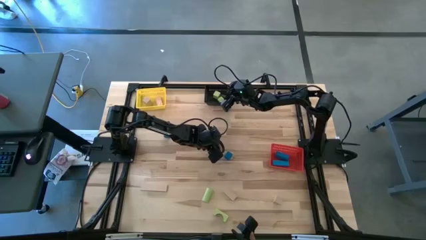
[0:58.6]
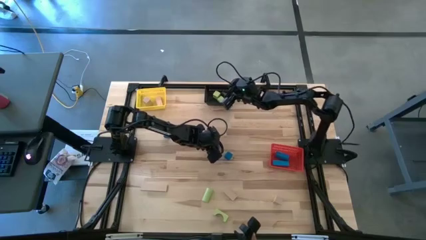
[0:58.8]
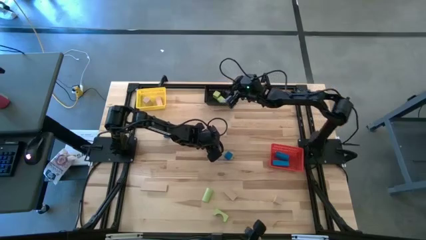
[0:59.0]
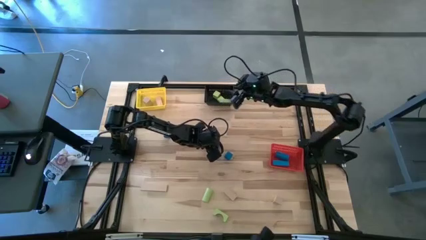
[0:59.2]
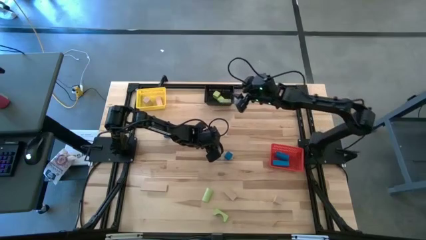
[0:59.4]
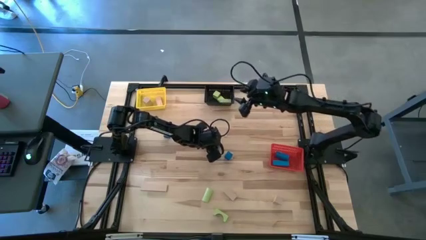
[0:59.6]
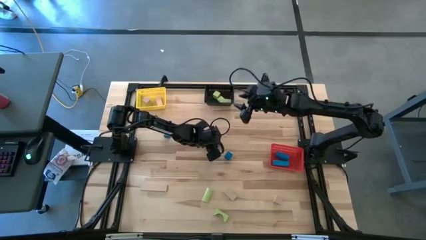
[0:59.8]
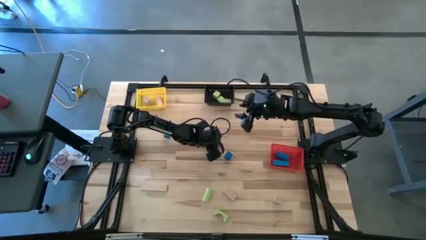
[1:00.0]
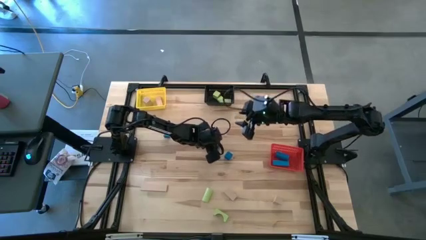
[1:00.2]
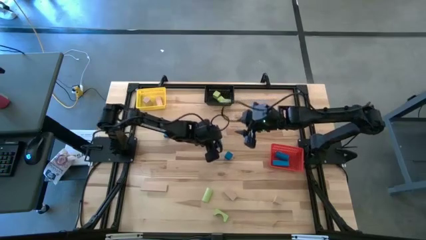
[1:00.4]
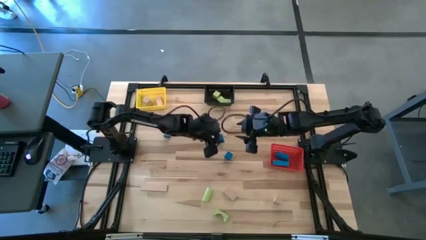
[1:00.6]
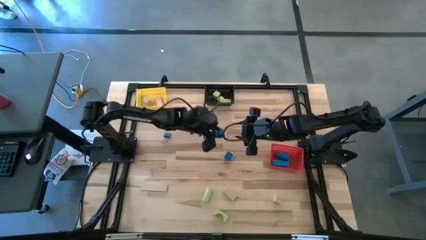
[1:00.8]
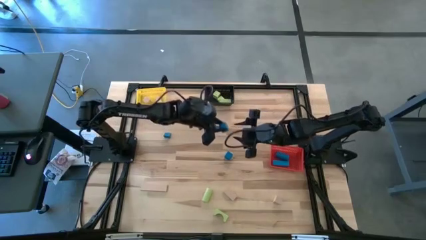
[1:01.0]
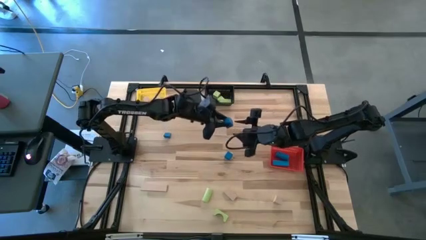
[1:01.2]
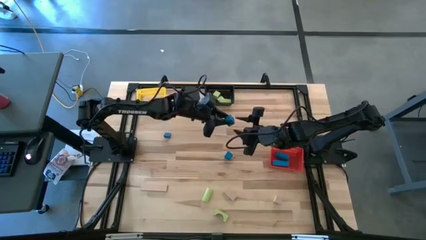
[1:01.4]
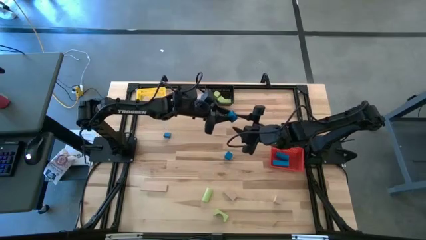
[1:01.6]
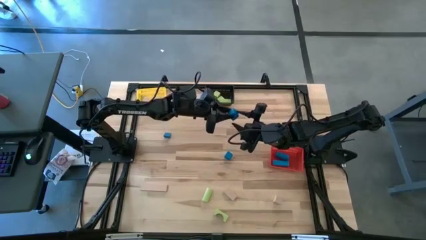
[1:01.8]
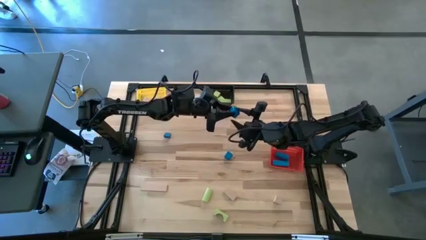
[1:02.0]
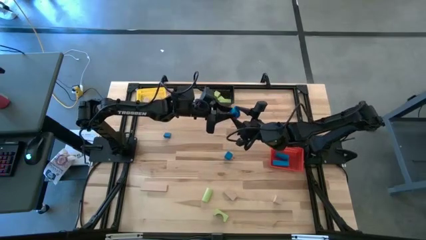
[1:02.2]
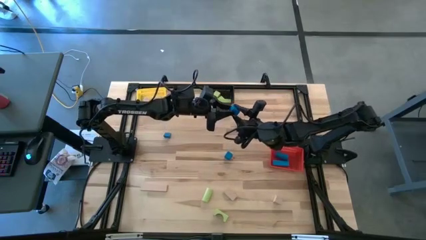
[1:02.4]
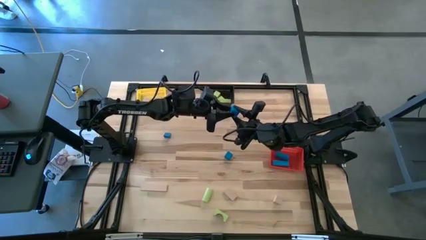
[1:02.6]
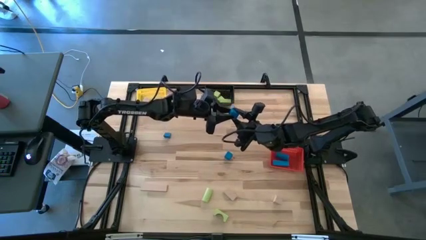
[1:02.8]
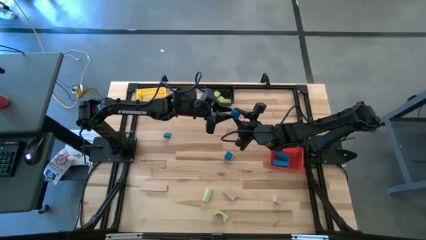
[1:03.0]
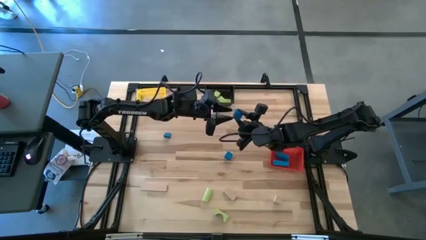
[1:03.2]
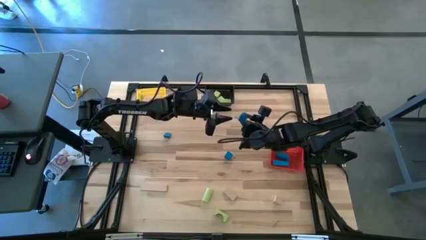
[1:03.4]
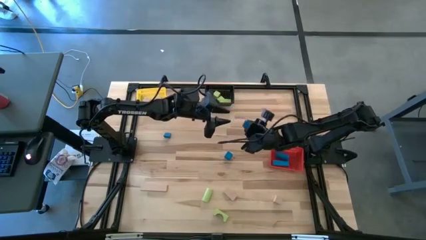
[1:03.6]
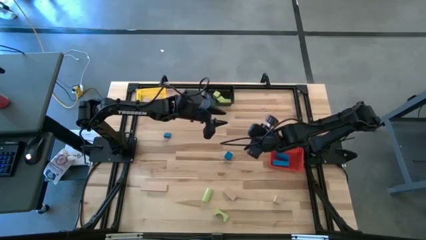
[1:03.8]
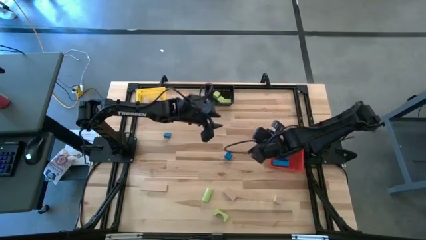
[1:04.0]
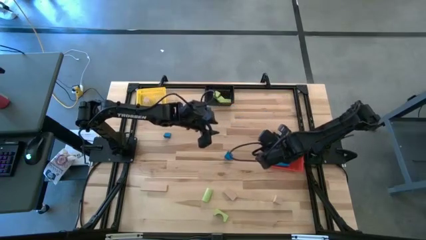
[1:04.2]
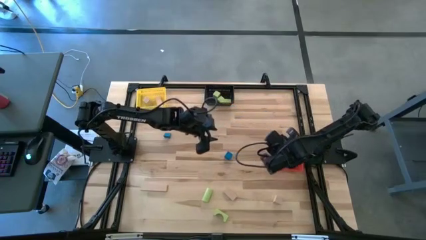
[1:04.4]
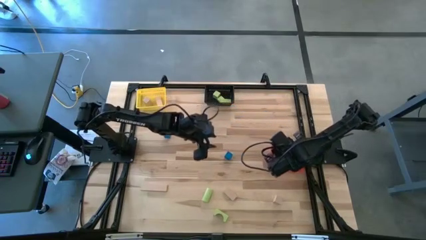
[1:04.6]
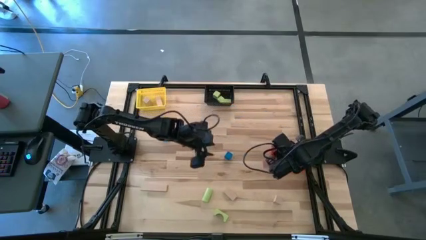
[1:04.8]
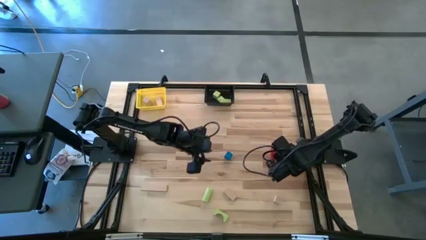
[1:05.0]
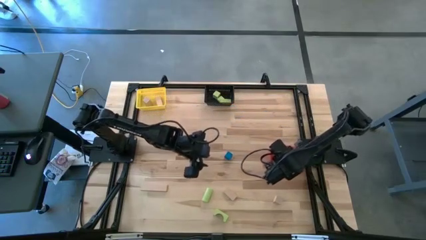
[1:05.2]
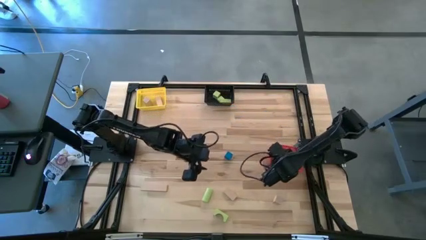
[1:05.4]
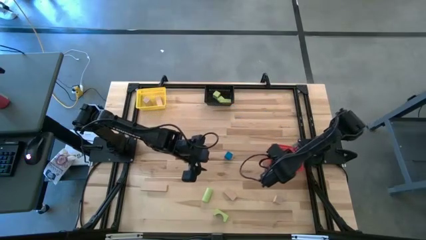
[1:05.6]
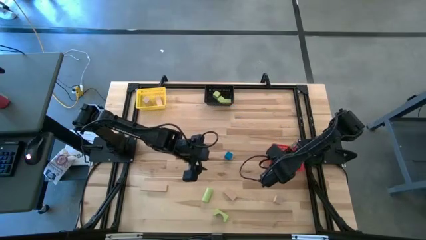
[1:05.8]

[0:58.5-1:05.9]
Task: Sort & place blocks by color
Put the blue block into the red basket

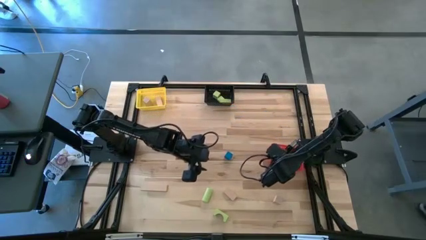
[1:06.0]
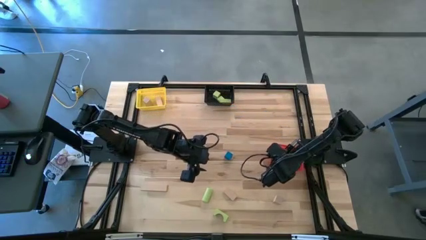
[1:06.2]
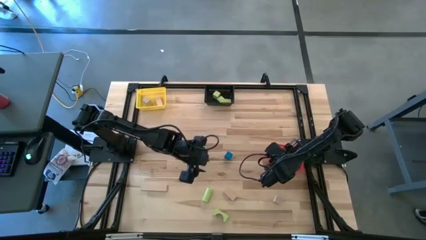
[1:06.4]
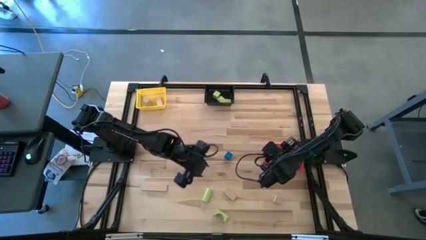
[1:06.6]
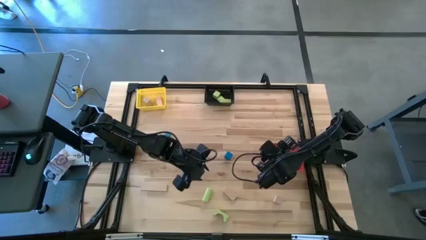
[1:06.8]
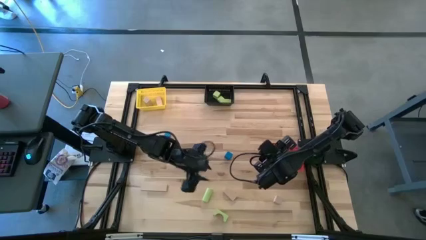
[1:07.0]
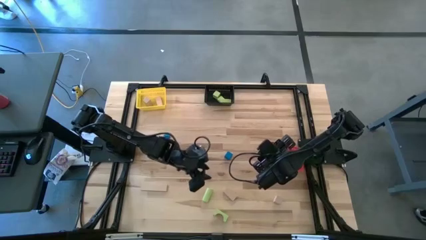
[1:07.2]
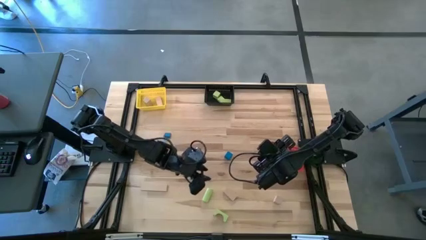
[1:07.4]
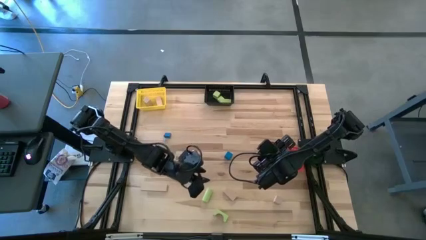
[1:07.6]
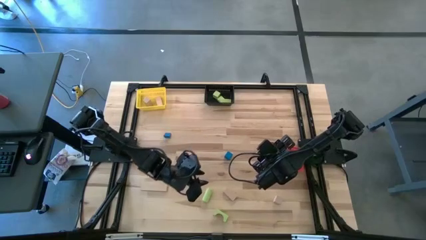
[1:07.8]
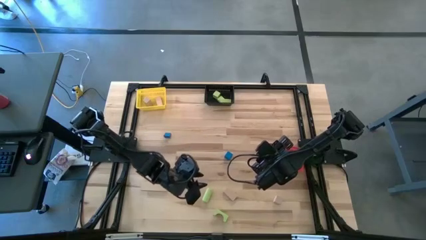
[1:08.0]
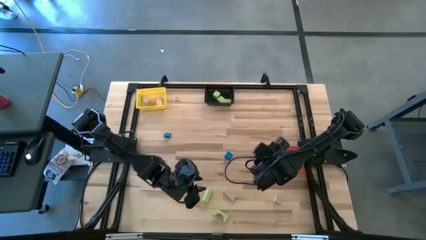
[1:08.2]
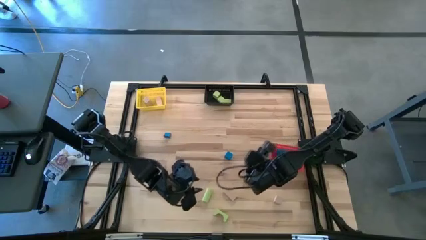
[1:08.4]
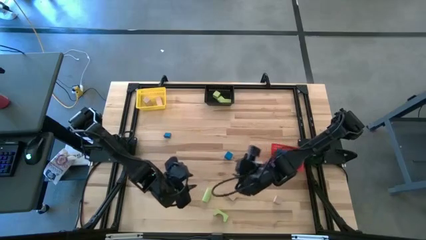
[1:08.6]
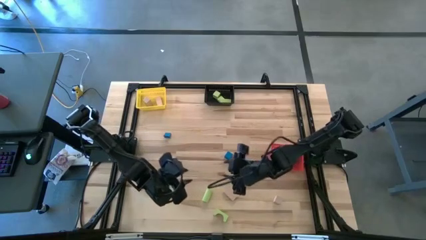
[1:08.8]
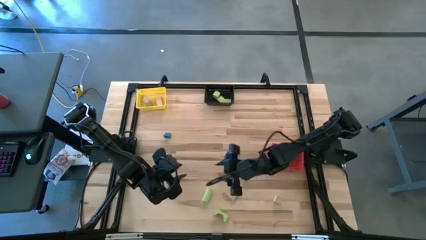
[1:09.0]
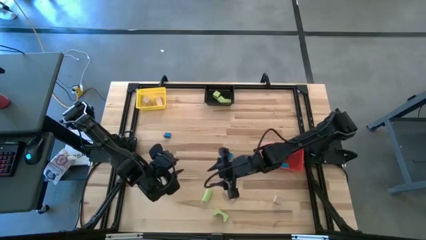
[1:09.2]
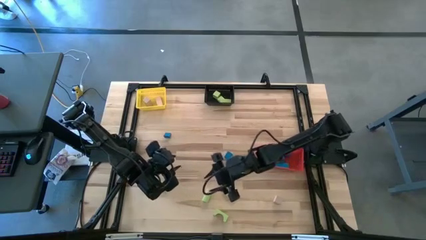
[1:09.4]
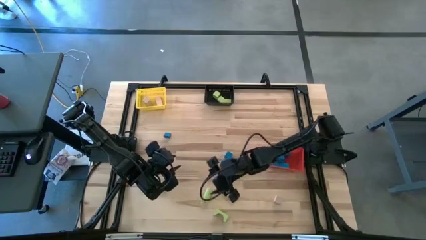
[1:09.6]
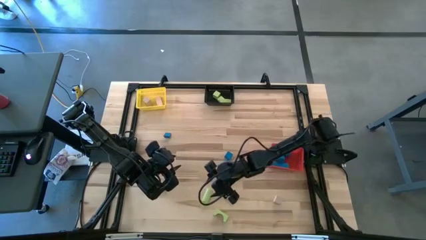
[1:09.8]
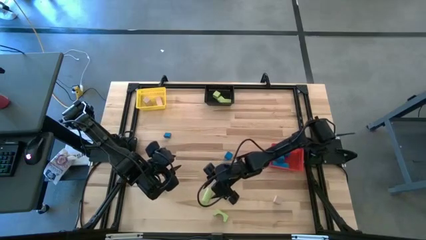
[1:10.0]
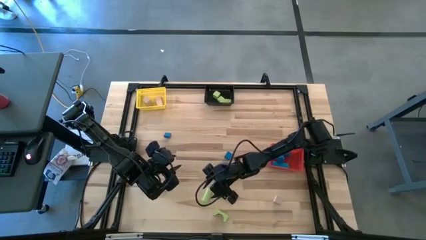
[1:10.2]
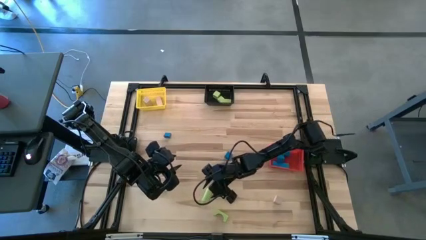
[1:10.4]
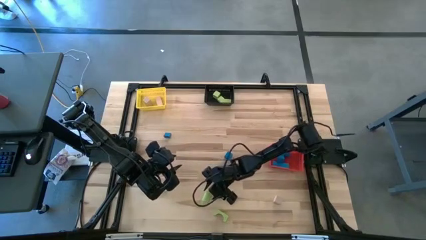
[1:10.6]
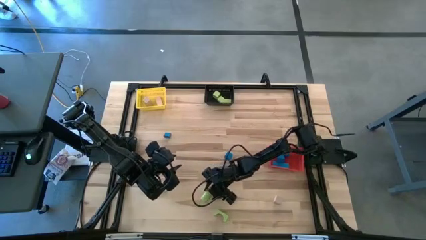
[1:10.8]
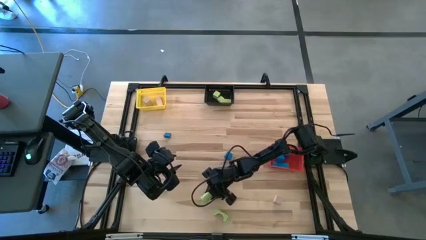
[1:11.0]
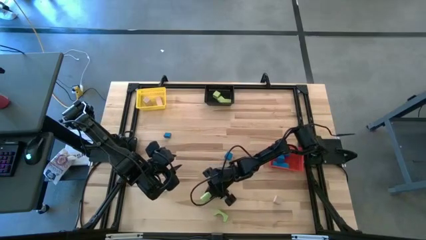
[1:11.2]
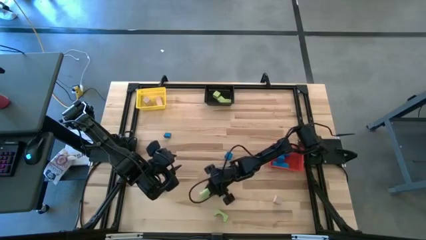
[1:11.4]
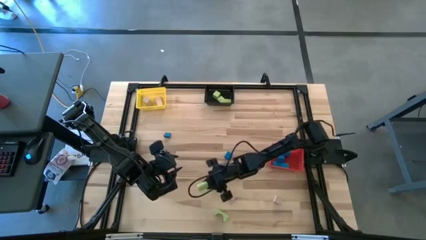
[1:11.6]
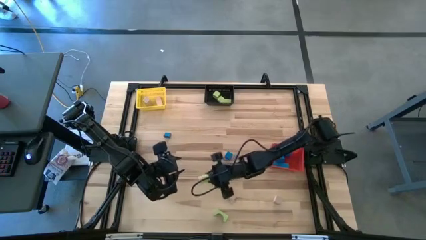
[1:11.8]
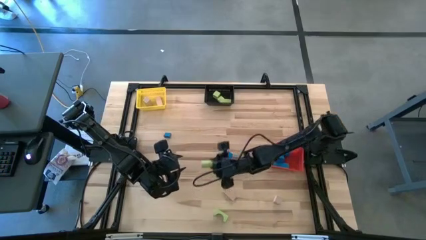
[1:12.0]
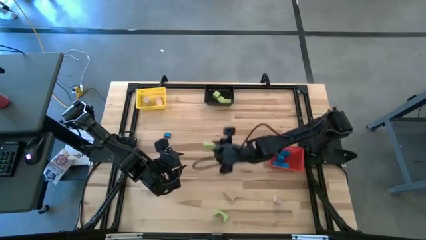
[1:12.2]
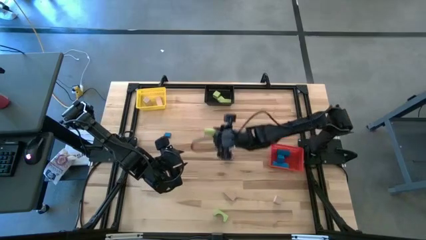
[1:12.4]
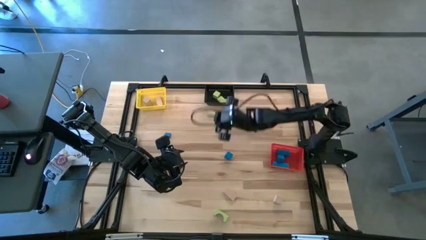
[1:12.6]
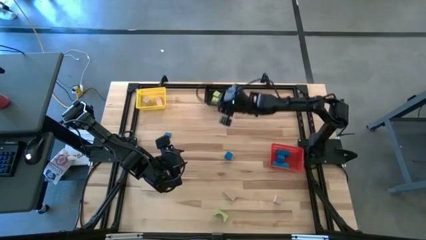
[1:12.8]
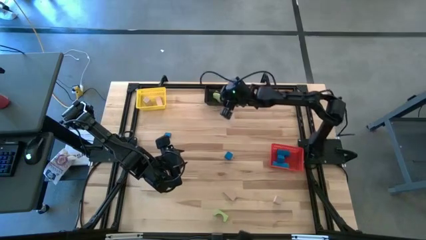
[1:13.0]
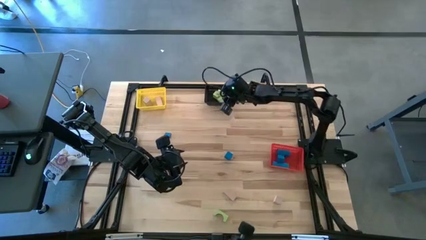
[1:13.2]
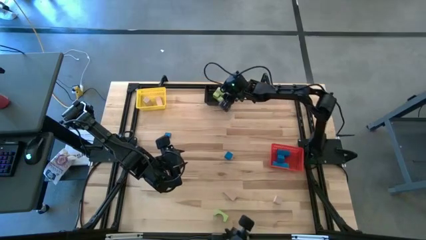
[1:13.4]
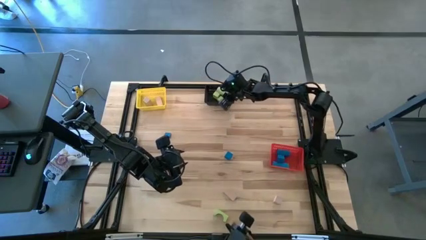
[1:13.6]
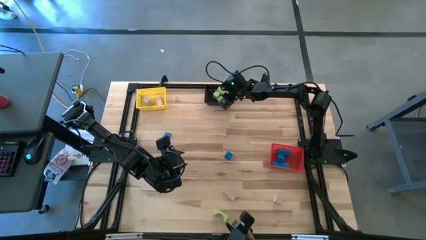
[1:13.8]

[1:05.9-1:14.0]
Put the green block into the black basket

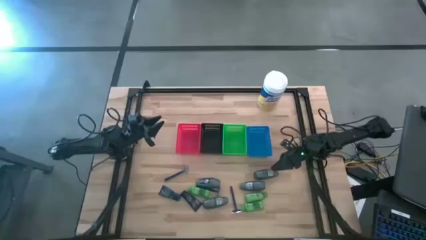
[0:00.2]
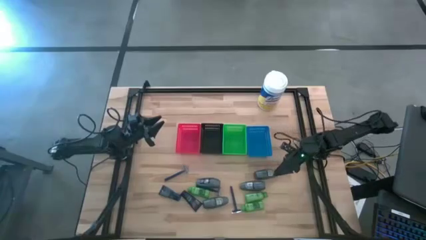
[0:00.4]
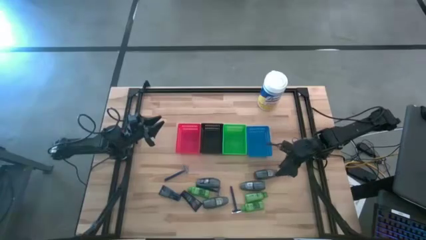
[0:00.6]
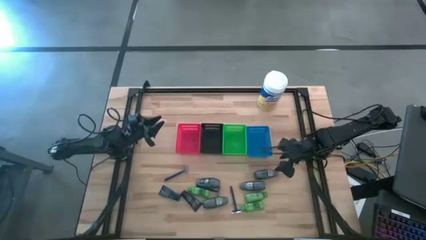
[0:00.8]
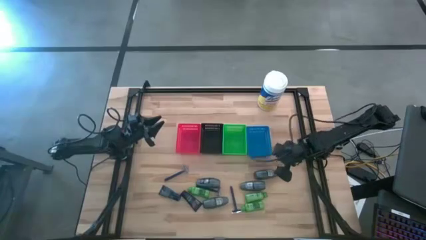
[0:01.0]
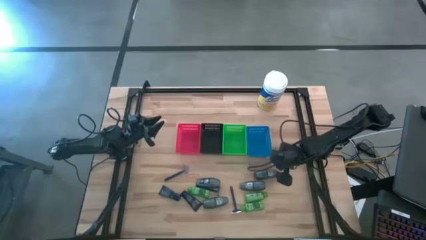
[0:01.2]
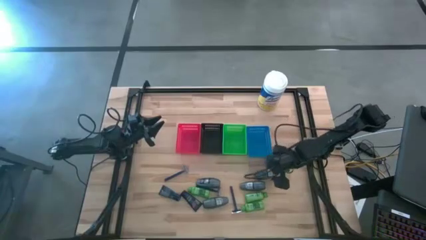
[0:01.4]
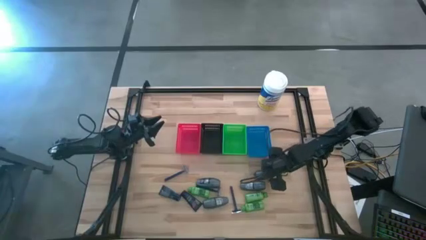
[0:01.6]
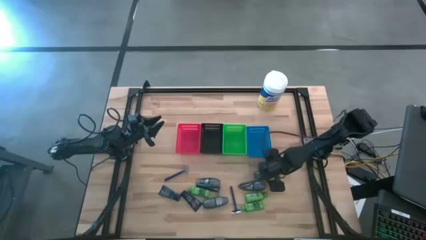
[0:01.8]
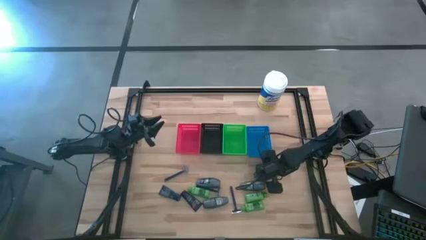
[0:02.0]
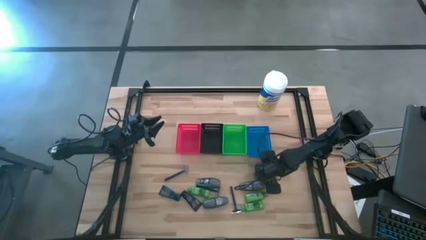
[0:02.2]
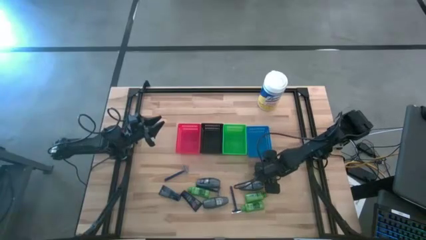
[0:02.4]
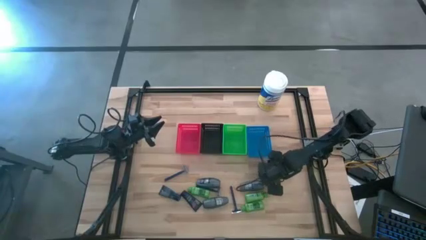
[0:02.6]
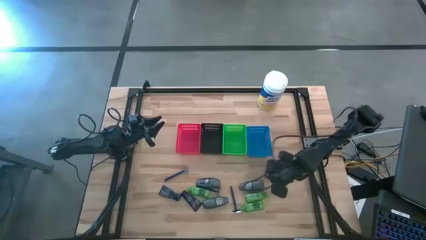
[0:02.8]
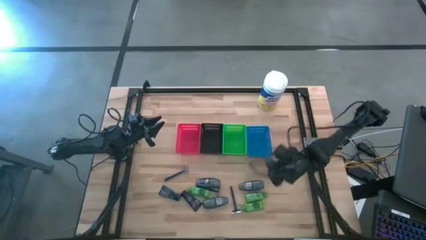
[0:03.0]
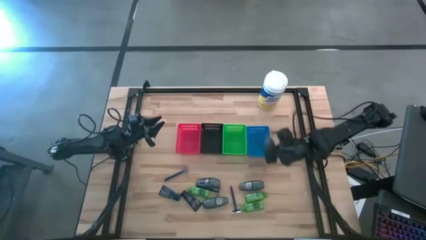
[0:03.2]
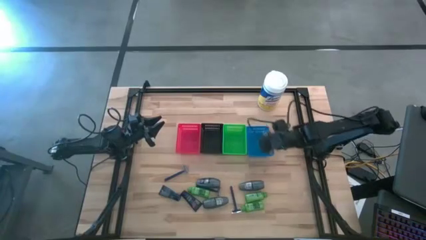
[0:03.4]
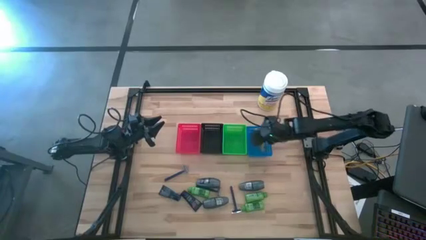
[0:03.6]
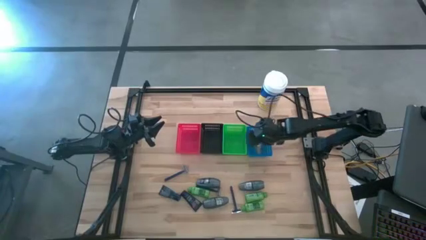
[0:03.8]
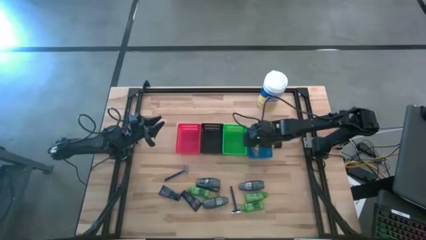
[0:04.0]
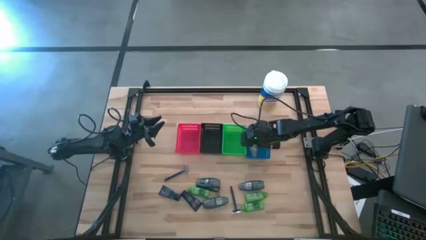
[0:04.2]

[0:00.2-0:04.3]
Task: Pick & Place Travel size toiletries
Put the gray deodorant into the blue bin
